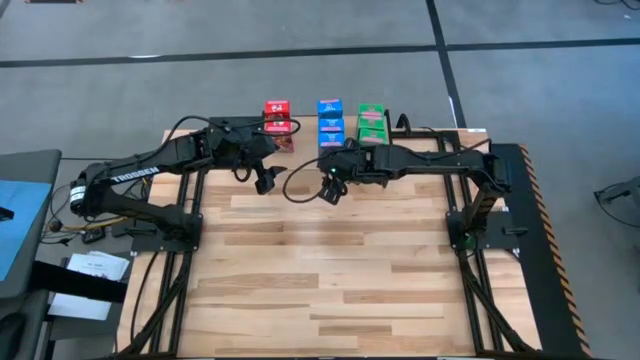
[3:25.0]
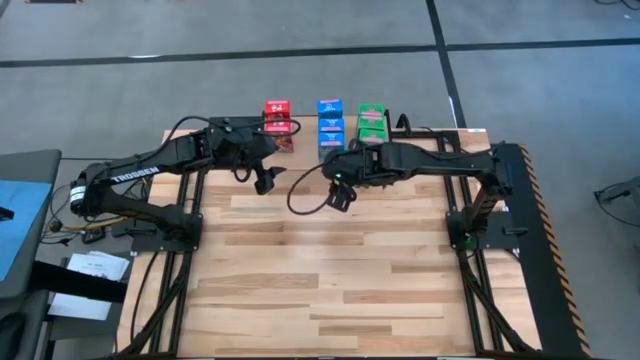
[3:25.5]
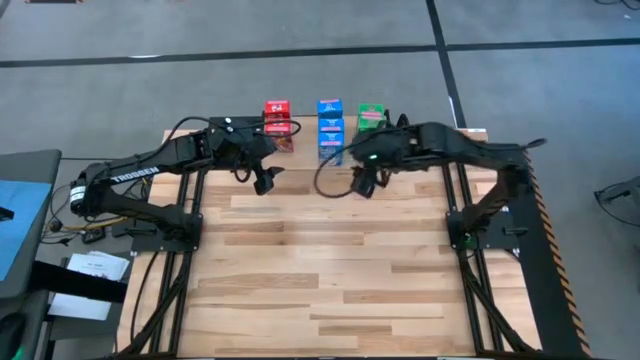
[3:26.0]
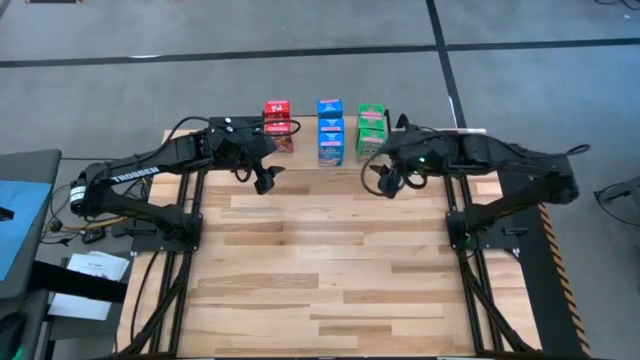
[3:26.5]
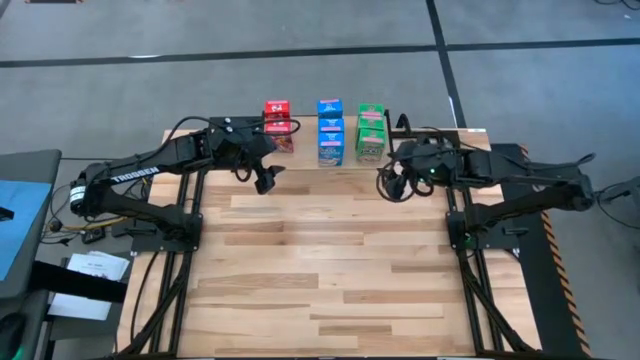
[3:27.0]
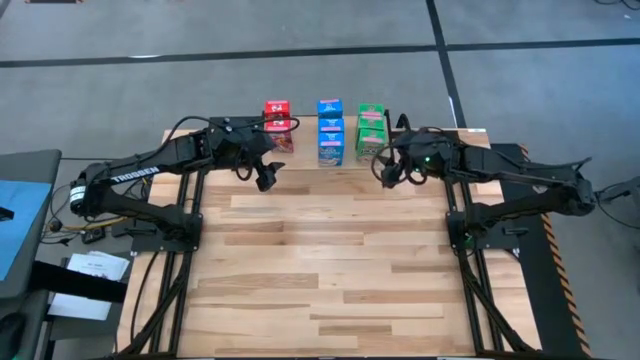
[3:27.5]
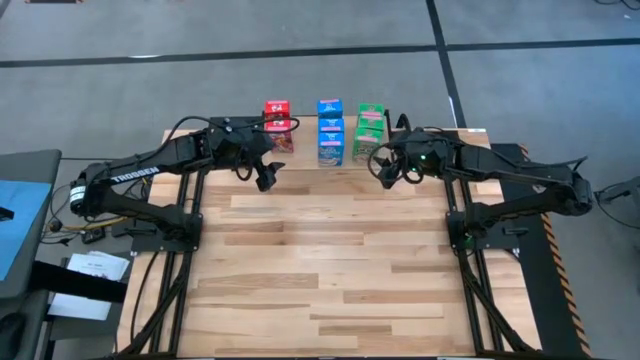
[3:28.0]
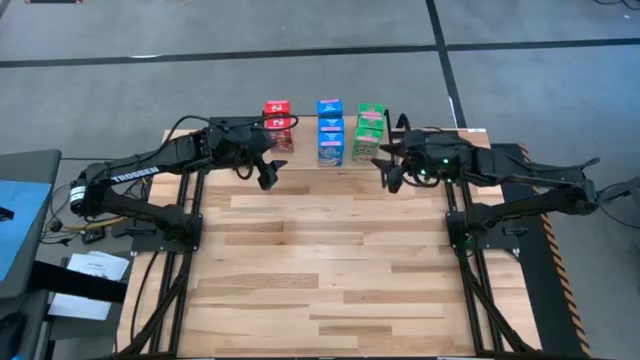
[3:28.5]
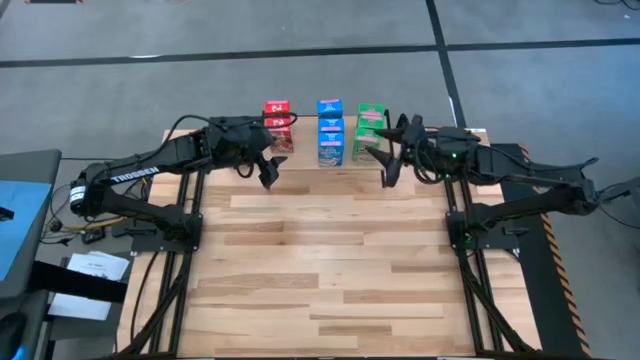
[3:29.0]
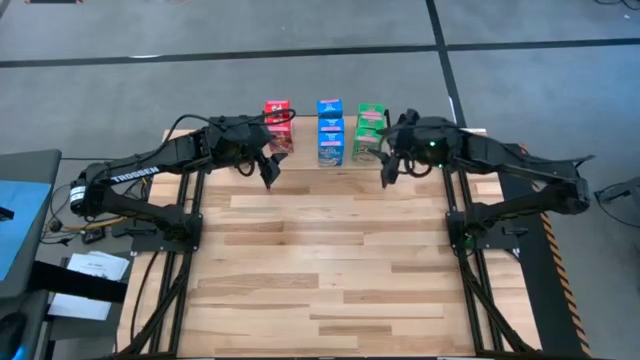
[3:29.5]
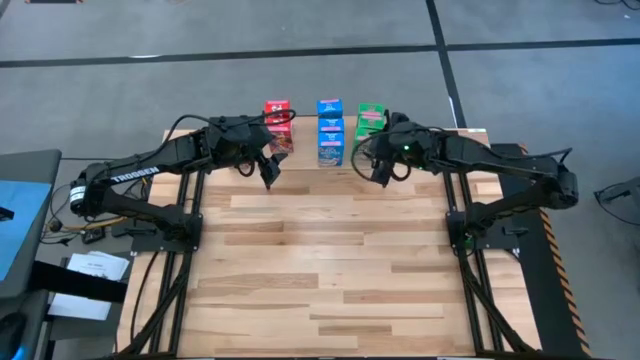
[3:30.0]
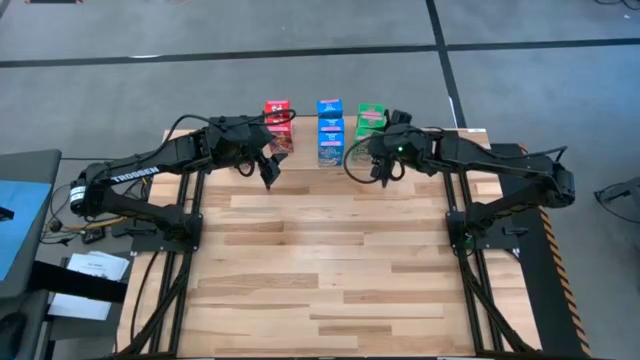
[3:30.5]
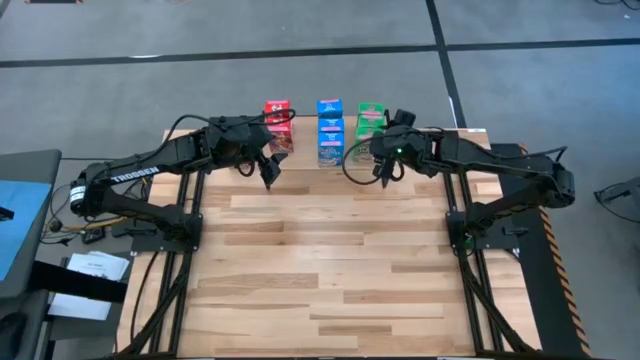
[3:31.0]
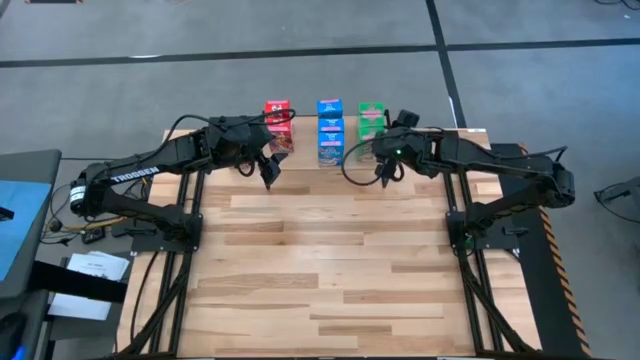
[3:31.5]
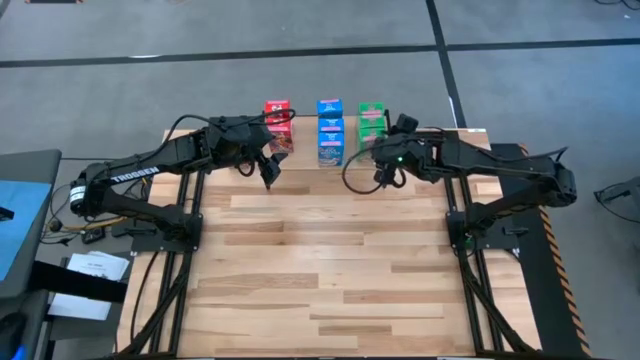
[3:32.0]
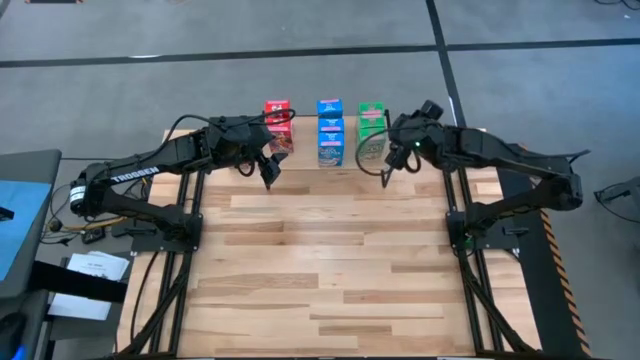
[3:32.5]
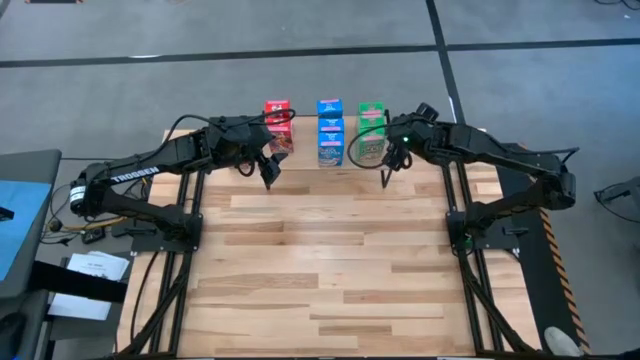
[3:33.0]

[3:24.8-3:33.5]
Task: Stack cereal on shelf
Adjust the green cereal box on the shelf

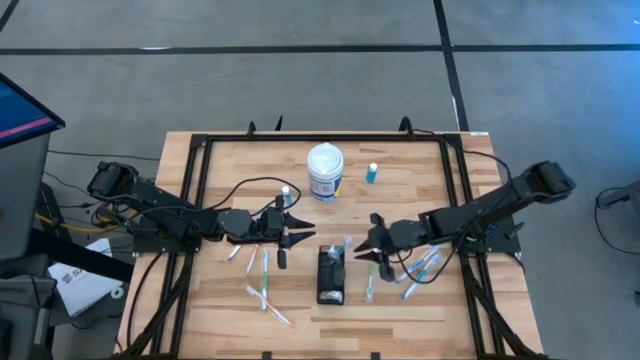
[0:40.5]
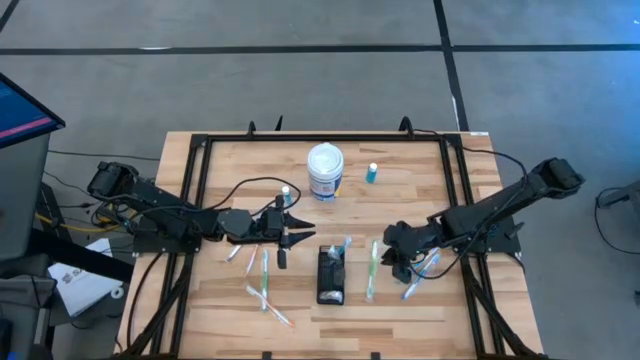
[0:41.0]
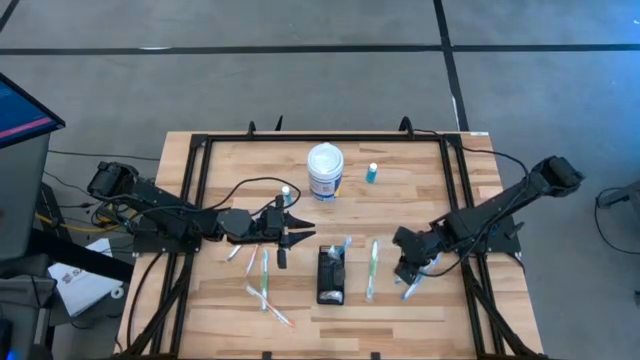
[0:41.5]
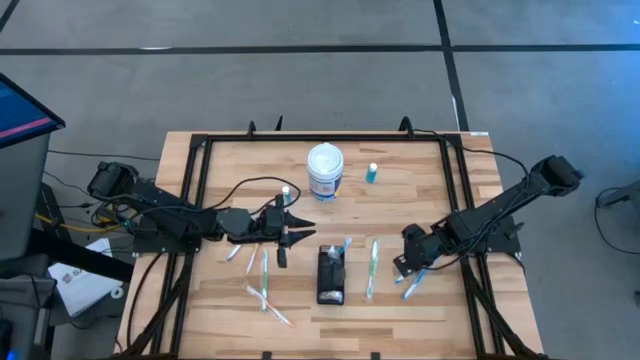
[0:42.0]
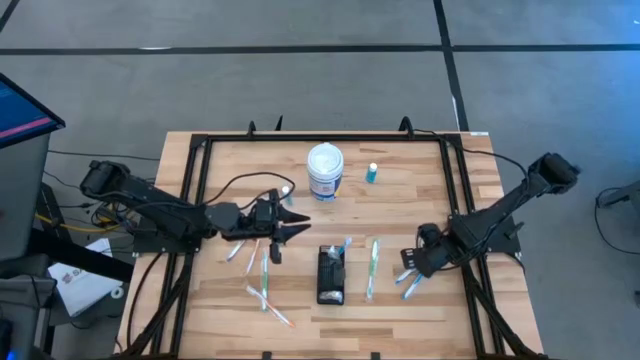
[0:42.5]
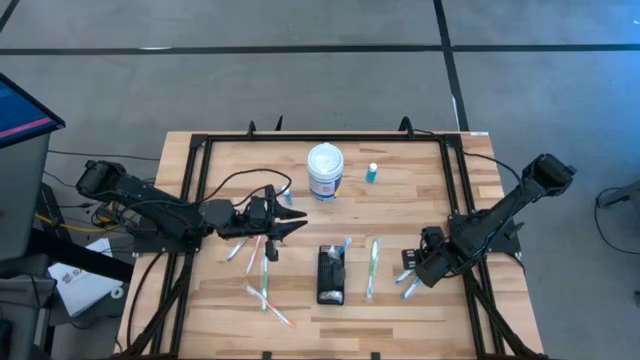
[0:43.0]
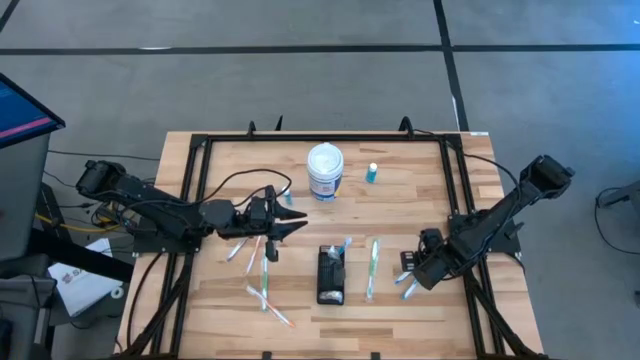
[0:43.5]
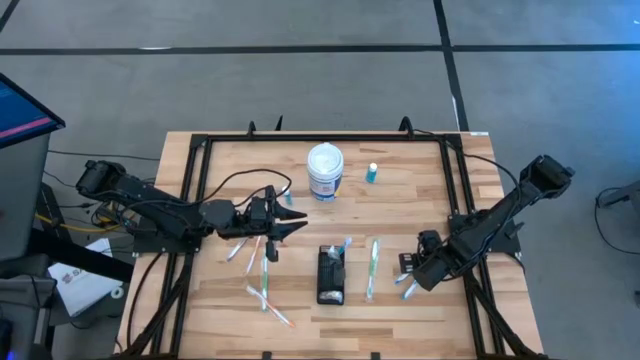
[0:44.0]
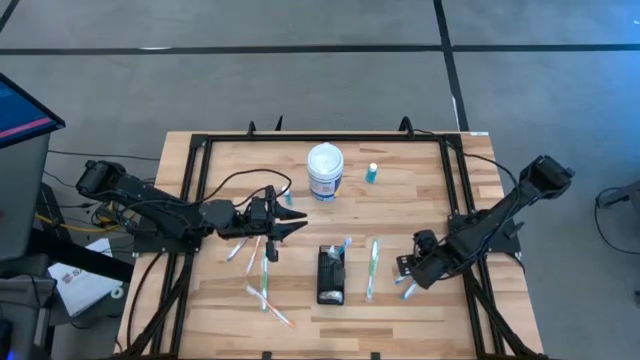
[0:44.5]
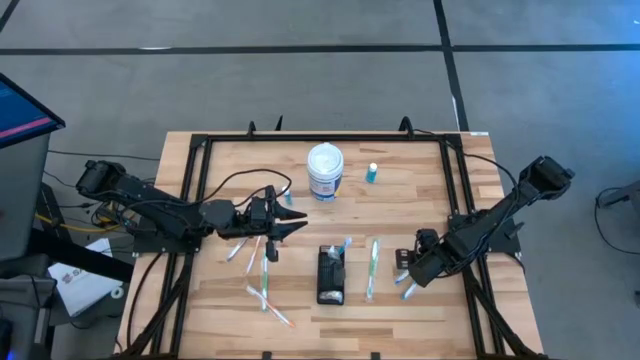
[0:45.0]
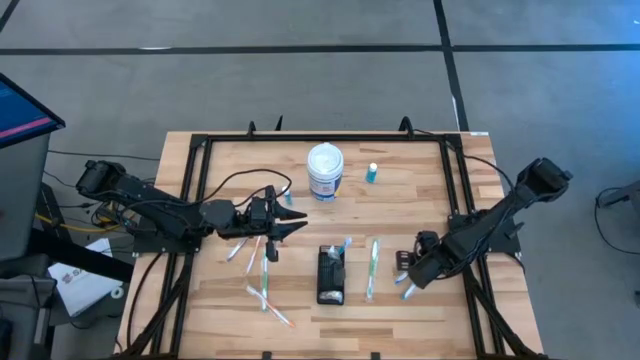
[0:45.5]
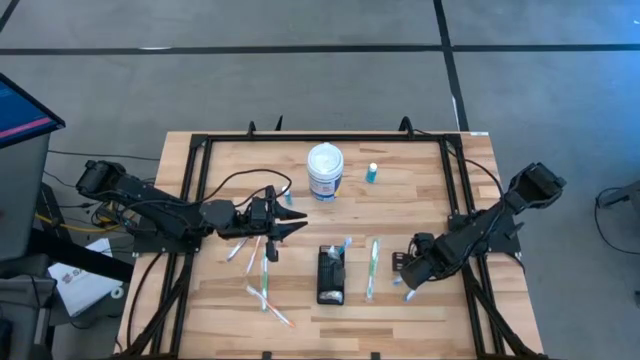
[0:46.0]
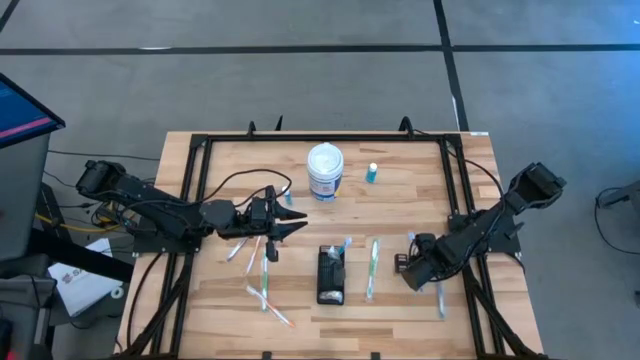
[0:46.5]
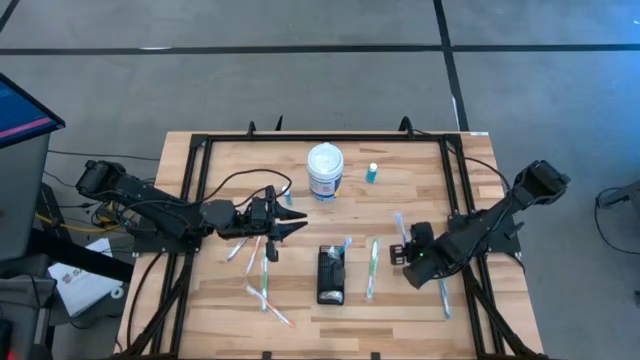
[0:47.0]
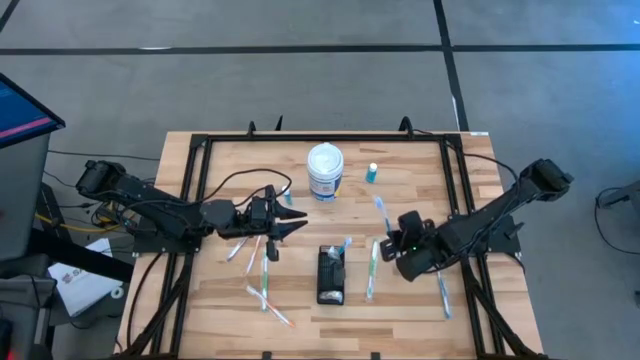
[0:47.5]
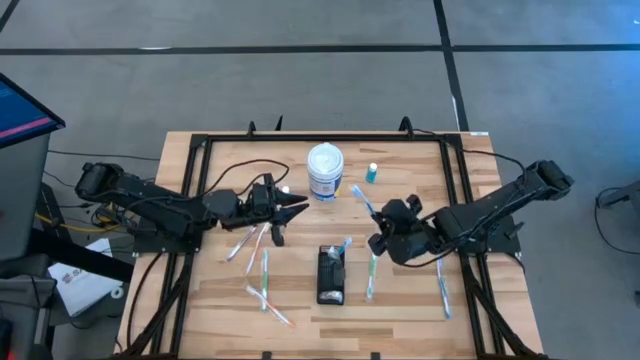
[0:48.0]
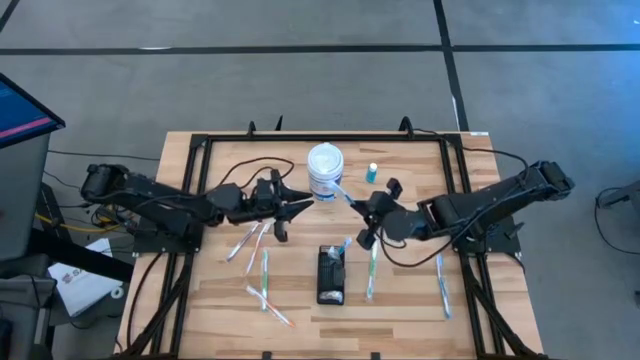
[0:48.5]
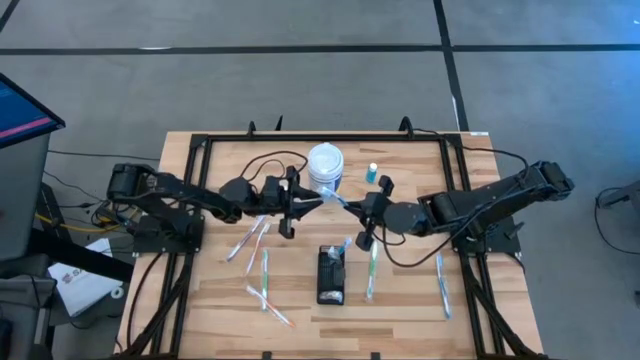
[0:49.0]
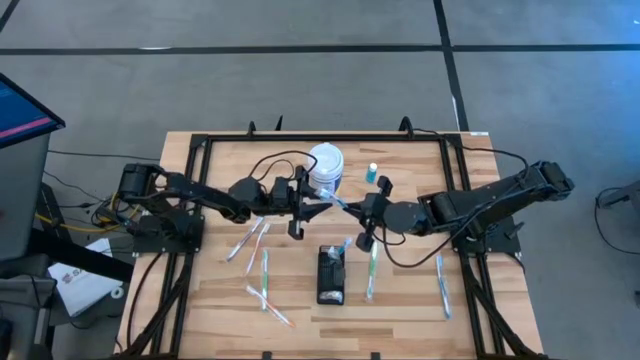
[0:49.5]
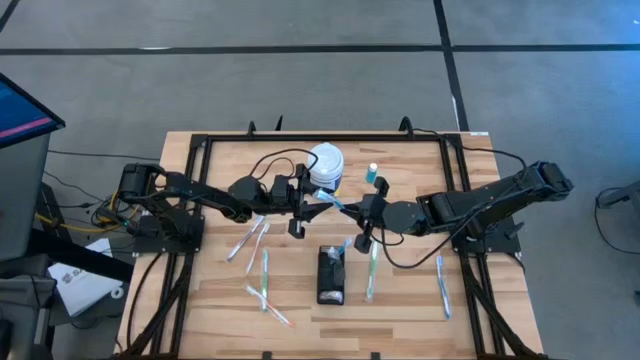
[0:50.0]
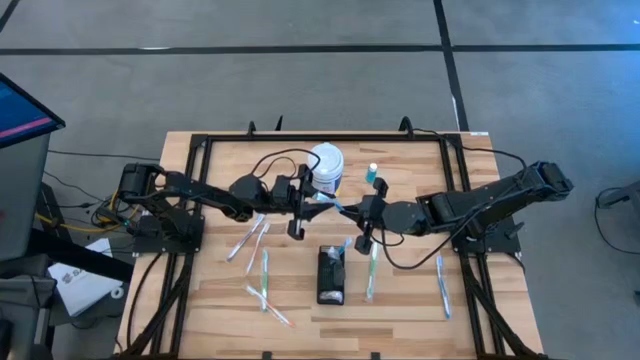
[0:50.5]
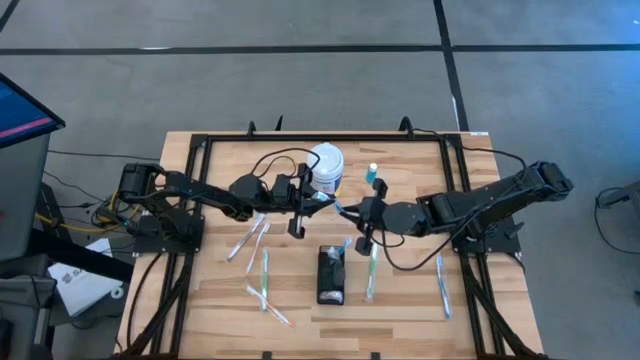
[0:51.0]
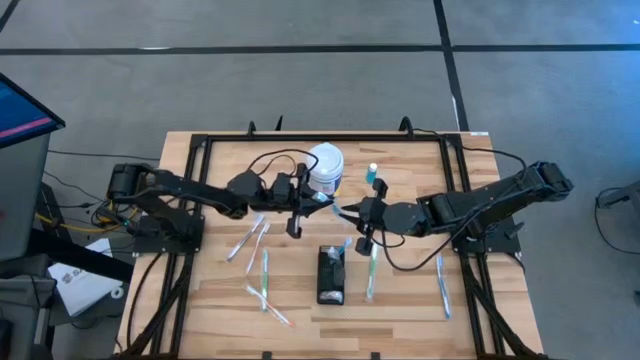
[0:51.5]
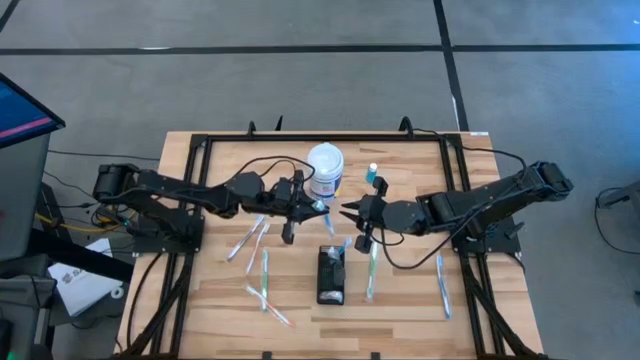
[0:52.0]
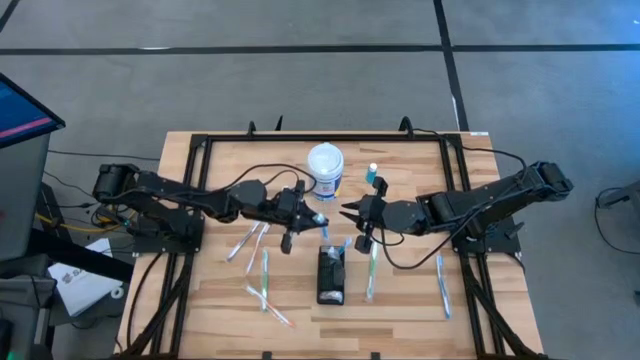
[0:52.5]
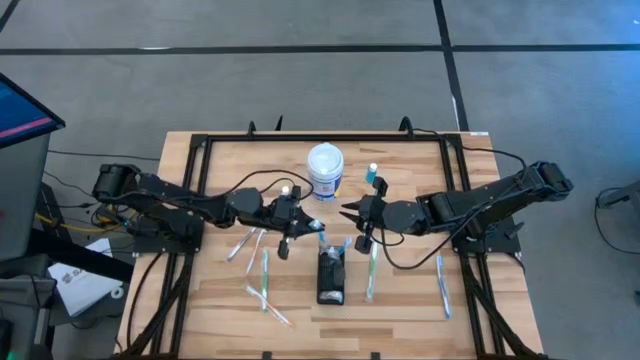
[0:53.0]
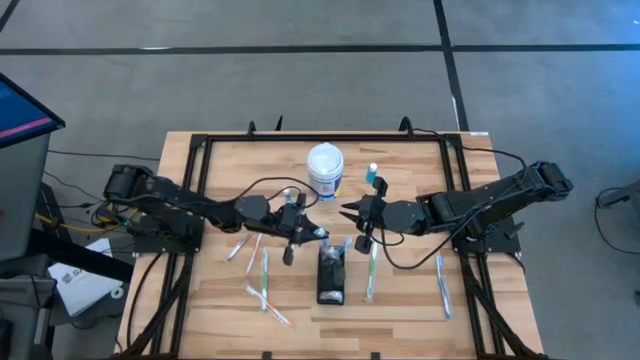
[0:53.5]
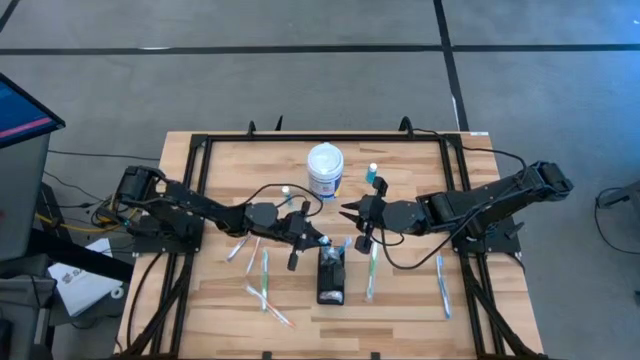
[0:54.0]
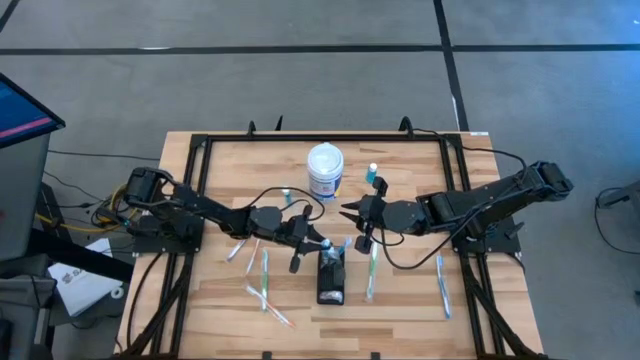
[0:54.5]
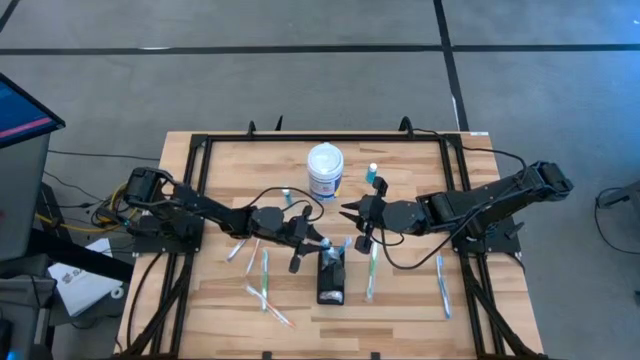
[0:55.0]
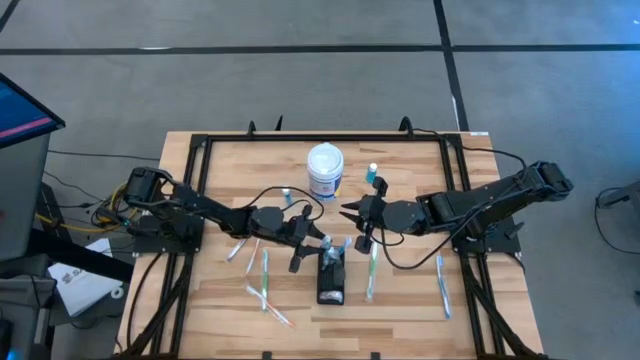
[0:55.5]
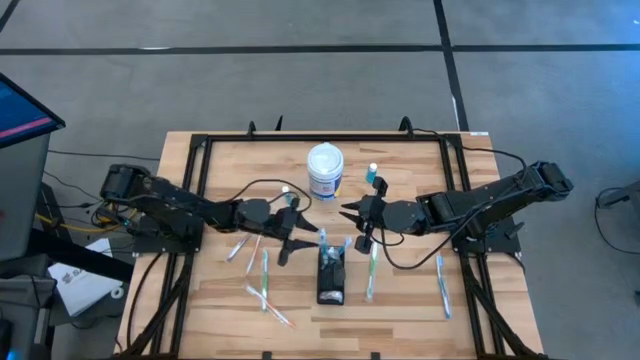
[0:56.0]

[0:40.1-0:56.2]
Task: Pick & Place toothbrushing station
Put the top blue toothbrush into the black mesh organizer
